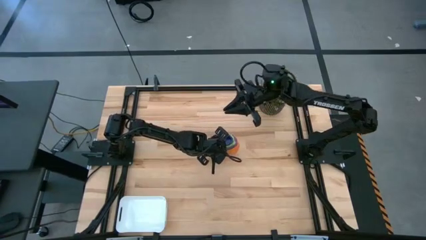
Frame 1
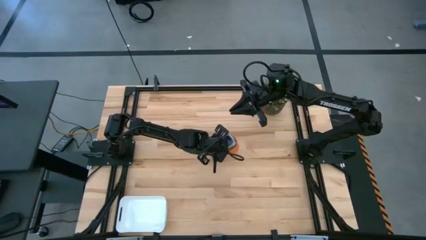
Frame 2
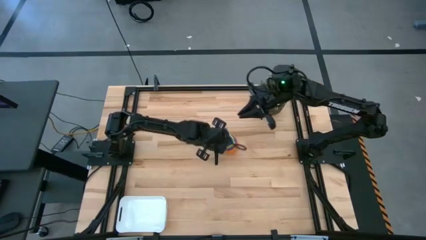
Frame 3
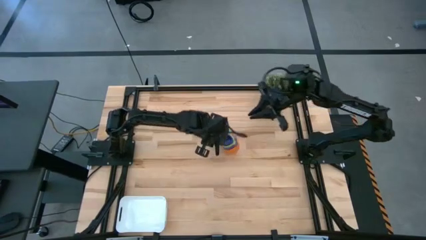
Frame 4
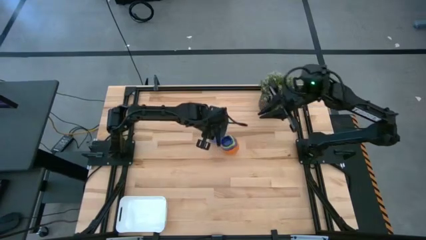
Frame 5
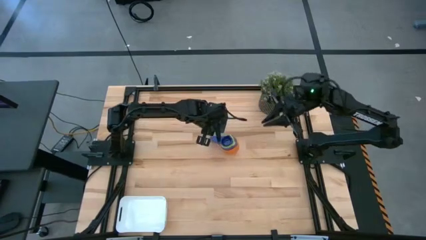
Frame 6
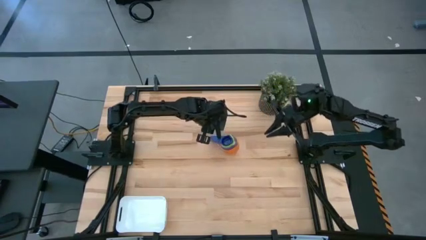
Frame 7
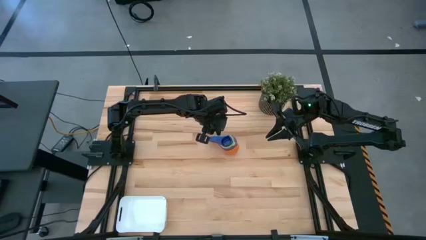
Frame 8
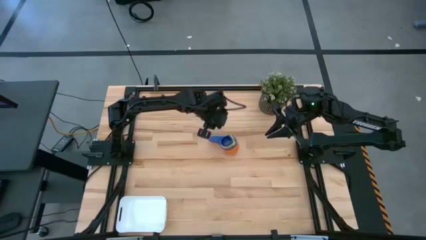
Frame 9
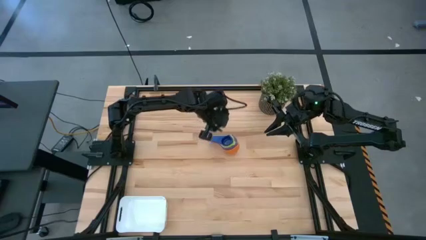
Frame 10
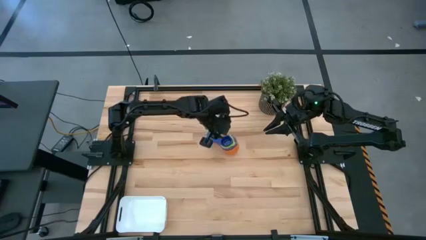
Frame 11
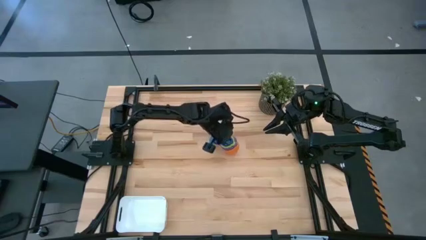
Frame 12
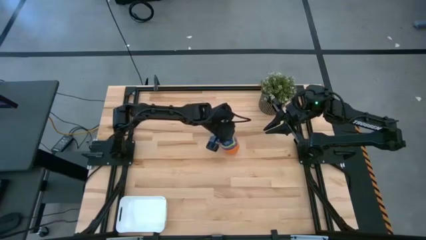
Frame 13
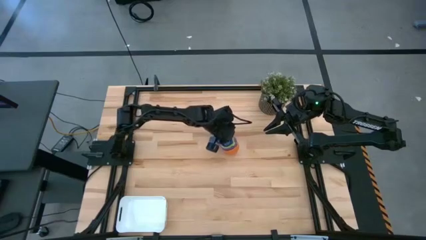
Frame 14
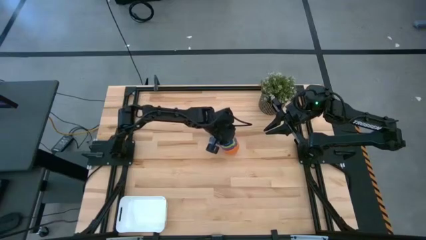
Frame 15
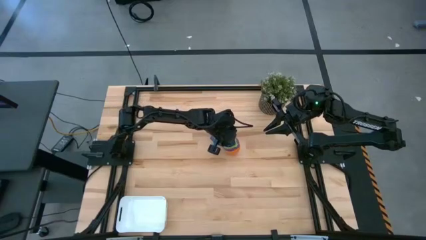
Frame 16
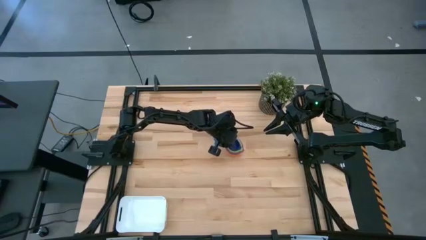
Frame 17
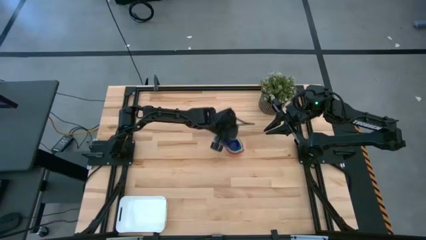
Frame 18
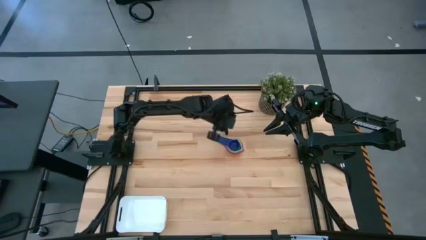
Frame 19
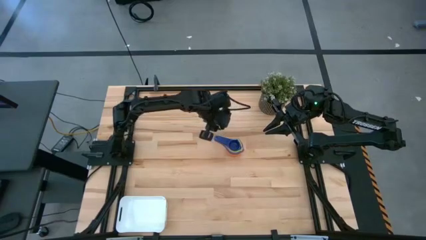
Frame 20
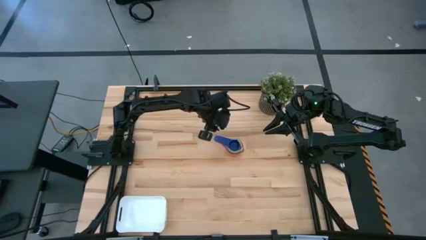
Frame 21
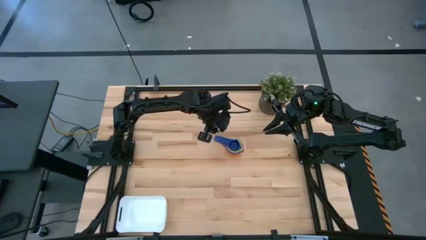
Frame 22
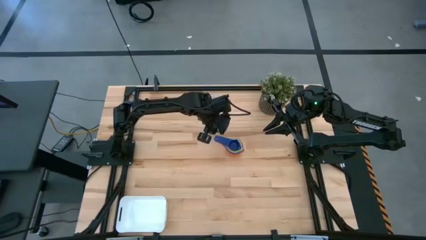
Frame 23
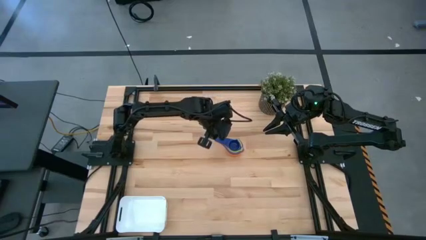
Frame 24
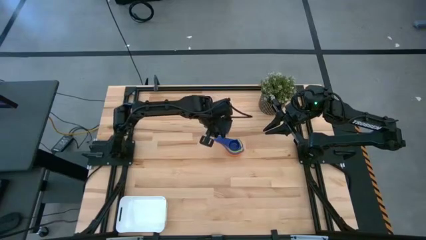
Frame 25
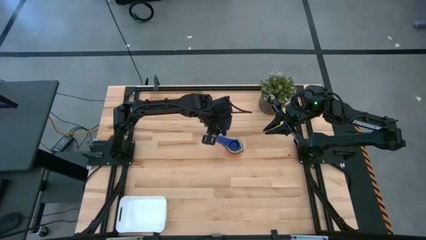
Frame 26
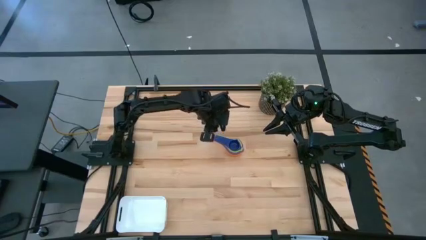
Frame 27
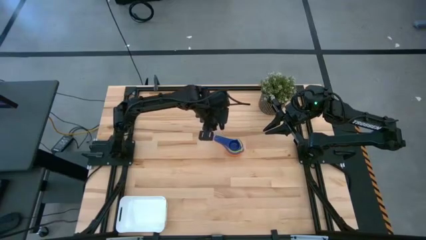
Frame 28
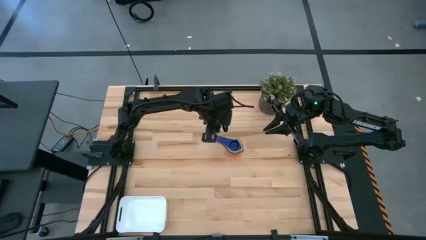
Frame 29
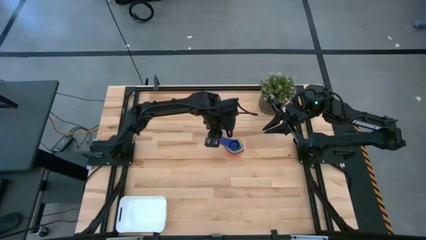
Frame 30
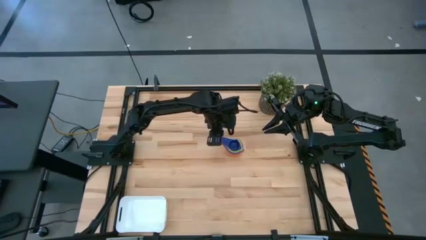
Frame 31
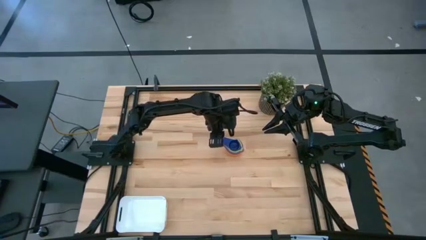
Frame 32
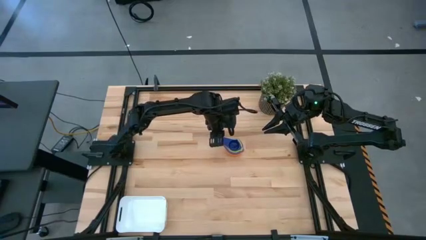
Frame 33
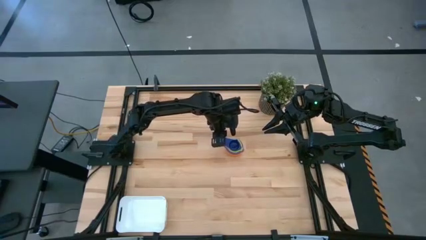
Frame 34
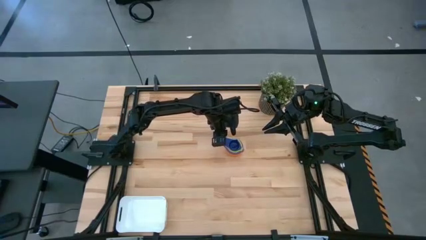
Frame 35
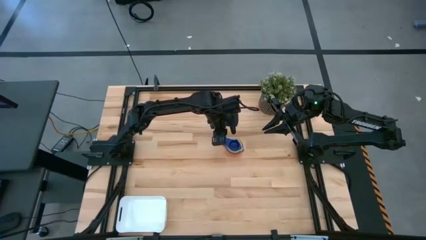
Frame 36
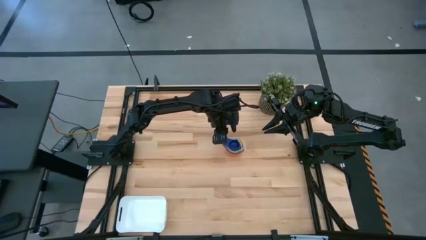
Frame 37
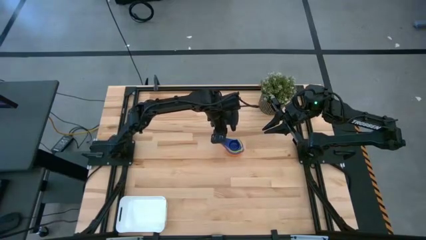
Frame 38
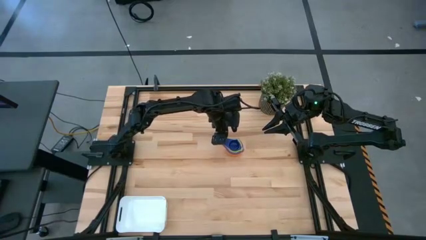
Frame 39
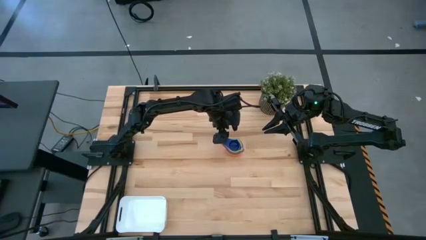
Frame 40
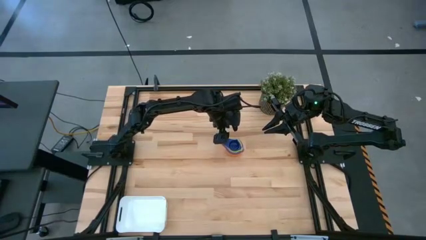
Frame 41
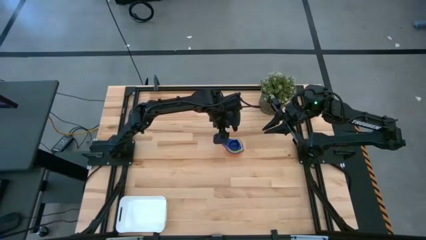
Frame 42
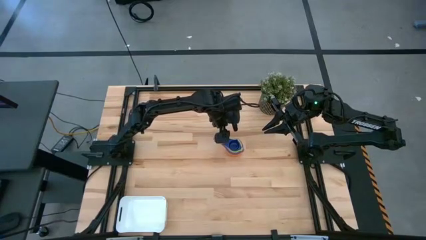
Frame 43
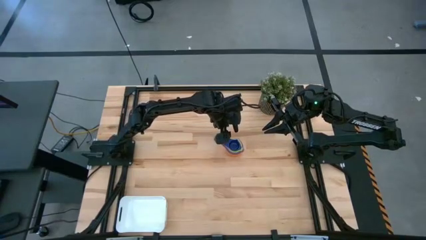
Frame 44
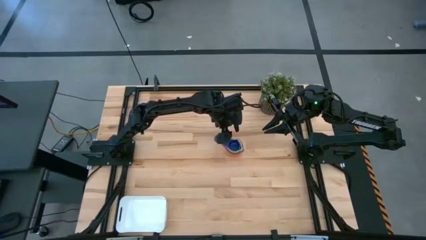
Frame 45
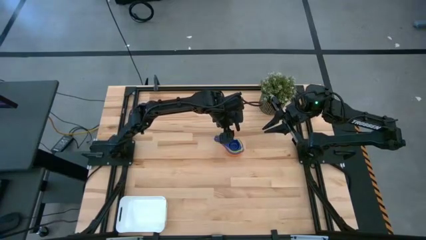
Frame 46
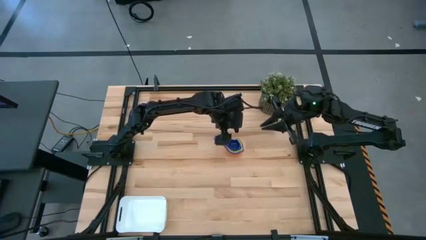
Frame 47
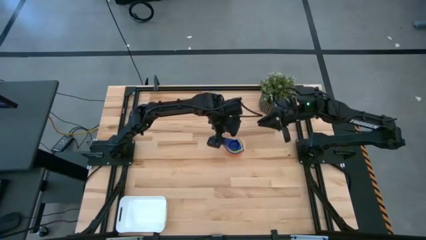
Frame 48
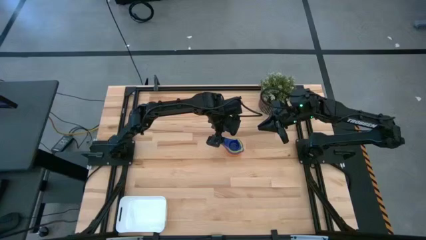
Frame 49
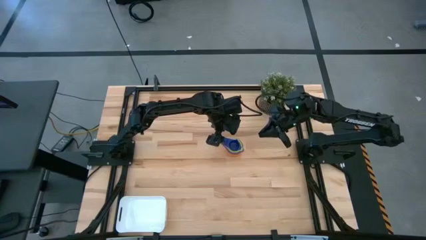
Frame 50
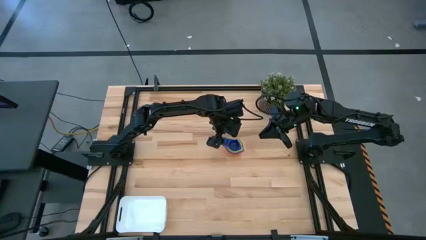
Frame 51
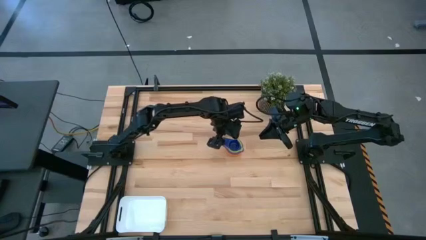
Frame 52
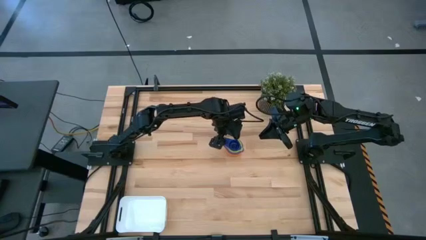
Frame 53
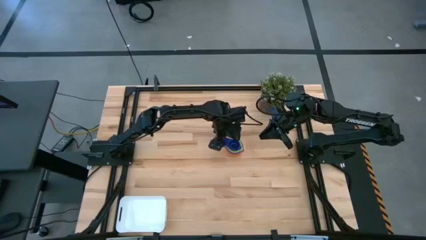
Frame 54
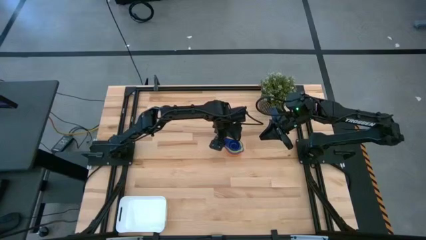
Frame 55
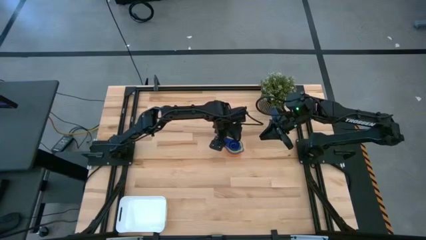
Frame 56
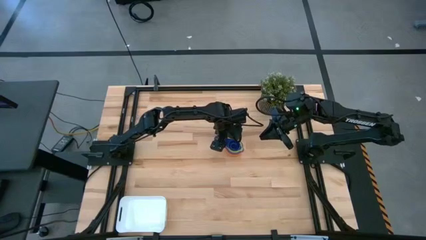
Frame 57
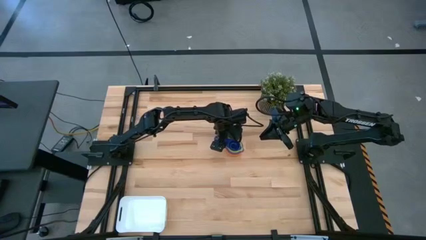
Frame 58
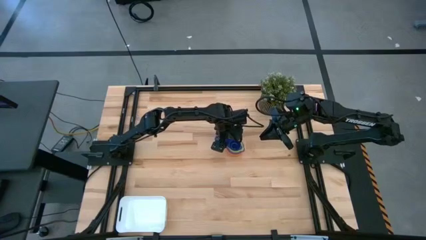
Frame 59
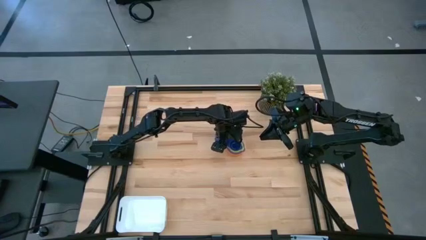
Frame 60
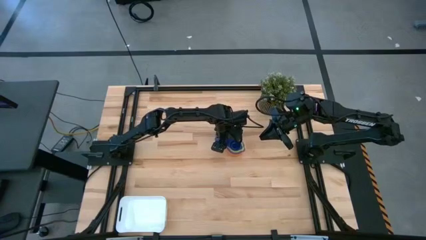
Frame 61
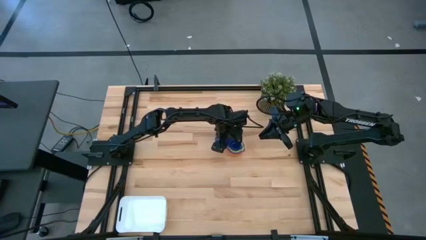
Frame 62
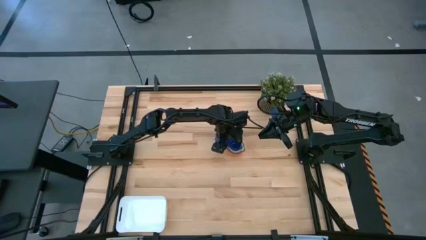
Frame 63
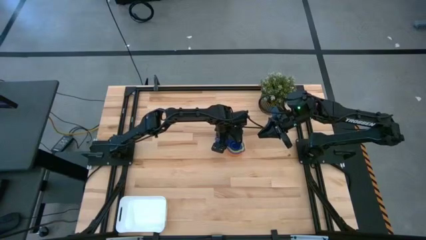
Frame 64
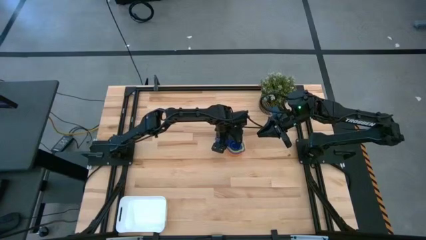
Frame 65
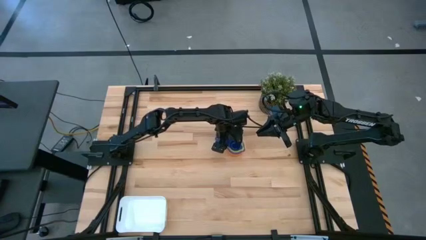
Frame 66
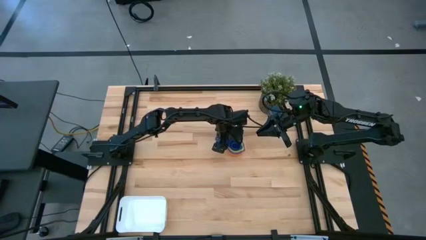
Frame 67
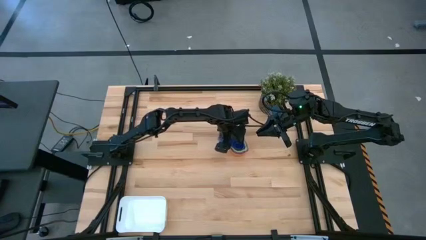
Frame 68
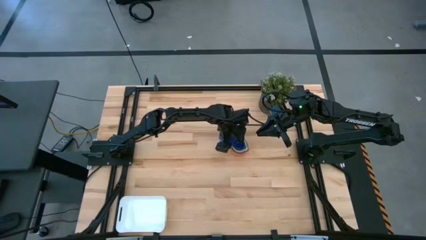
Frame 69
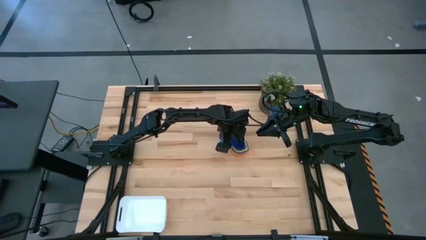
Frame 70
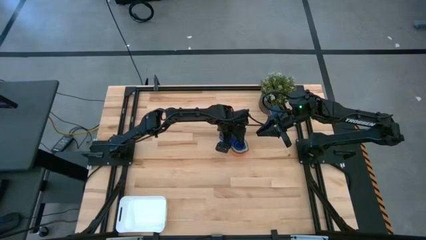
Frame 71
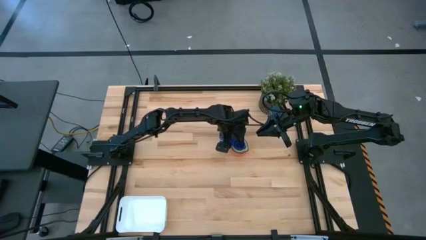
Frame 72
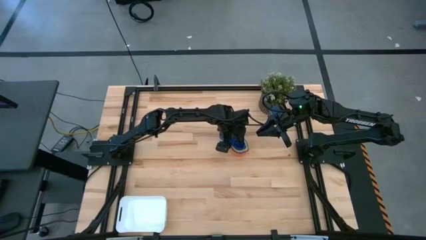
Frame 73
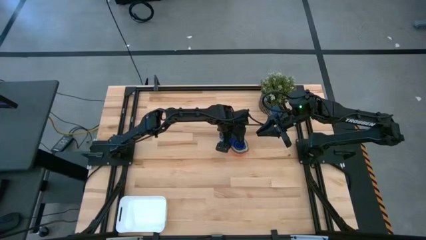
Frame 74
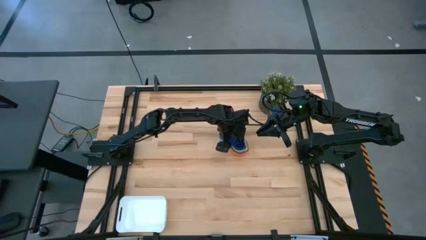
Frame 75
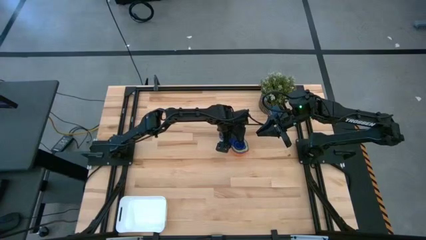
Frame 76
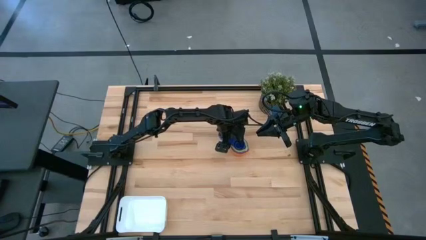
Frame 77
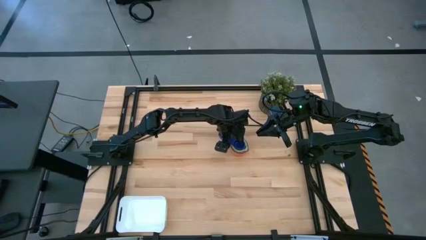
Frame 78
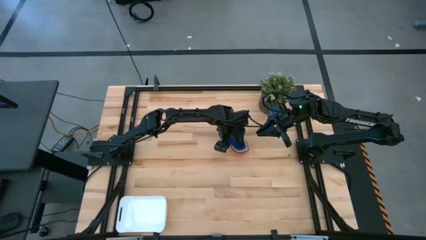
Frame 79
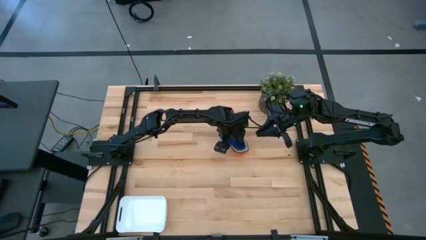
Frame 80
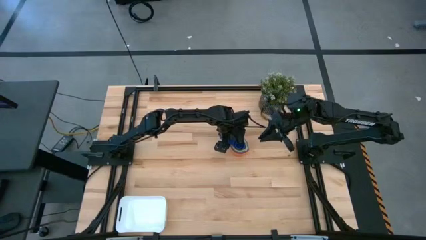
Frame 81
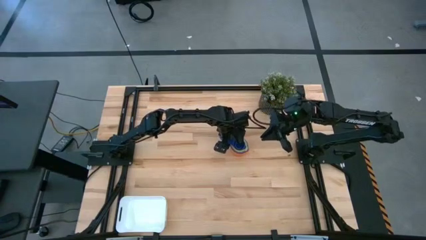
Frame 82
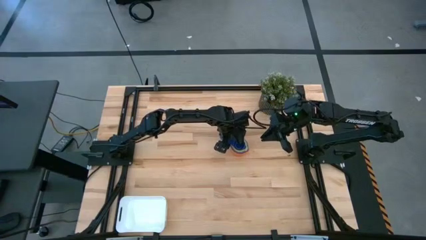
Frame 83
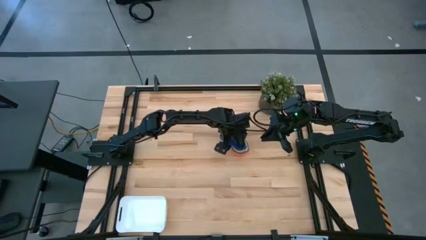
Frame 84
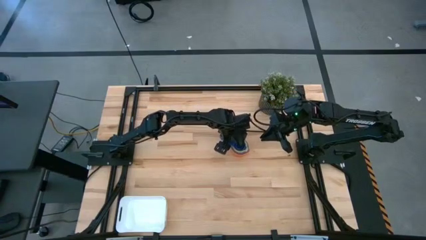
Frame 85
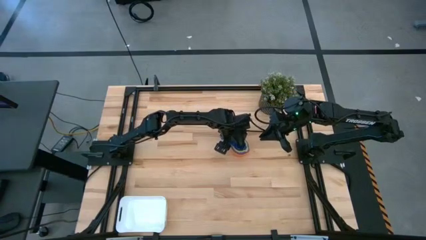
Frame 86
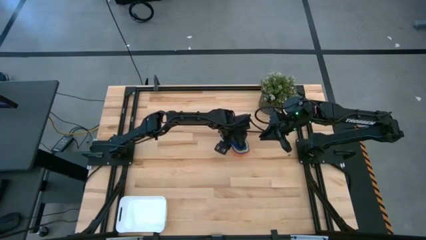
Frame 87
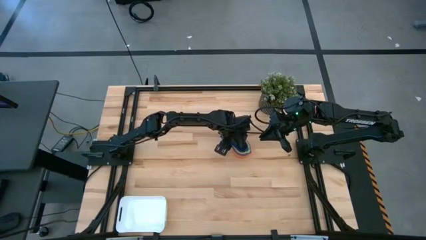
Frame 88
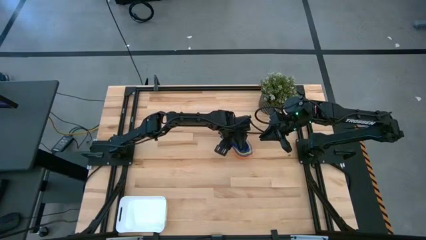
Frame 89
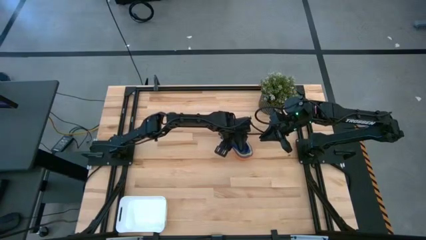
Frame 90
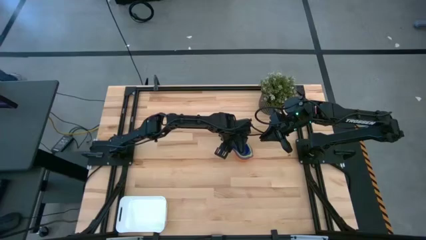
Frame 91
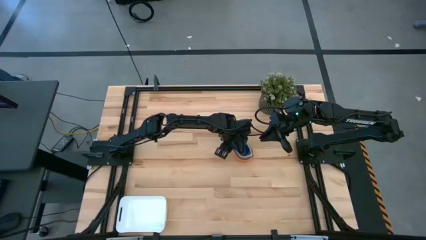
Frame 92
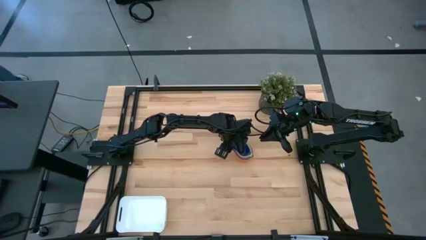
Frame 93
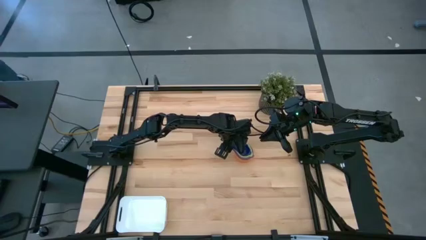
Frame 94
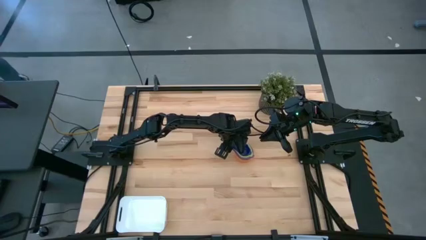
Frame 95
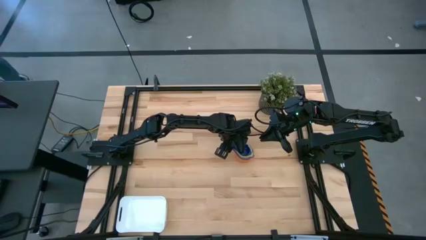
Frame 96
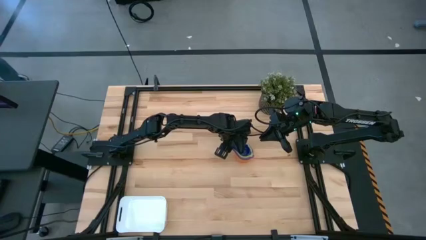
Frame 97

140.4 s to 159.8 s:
Task: Nest measuring cups in basket
Put the nested measuring cups into the white bin
